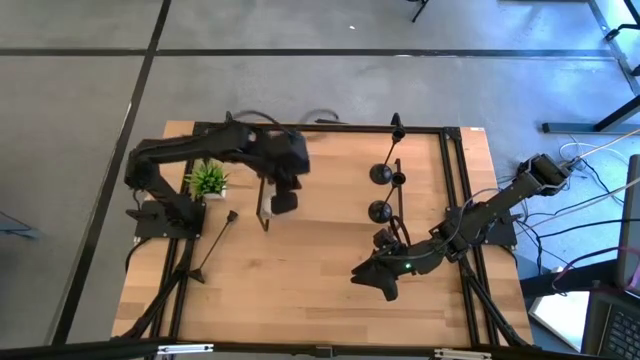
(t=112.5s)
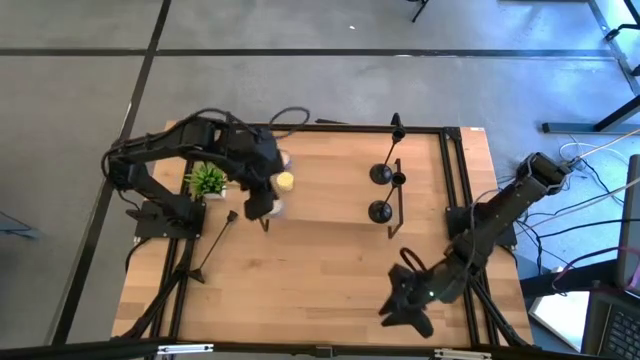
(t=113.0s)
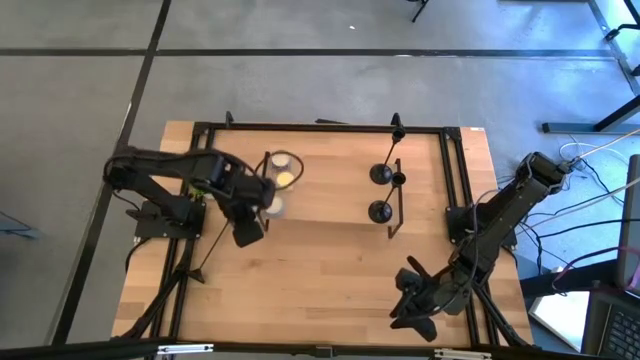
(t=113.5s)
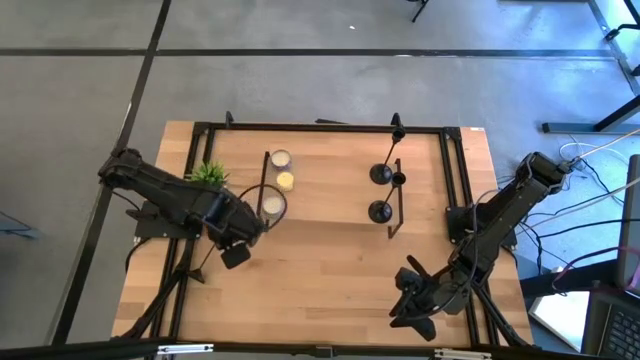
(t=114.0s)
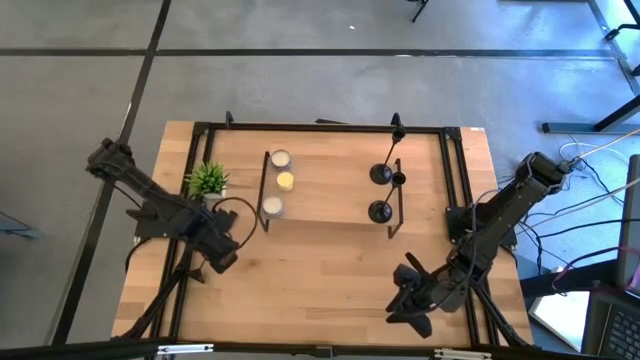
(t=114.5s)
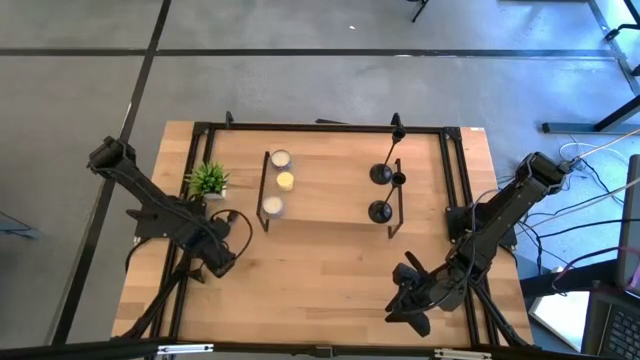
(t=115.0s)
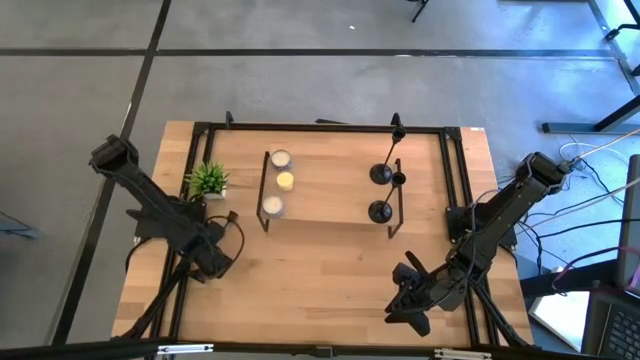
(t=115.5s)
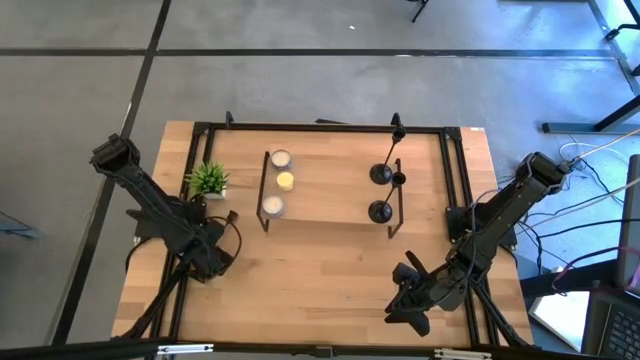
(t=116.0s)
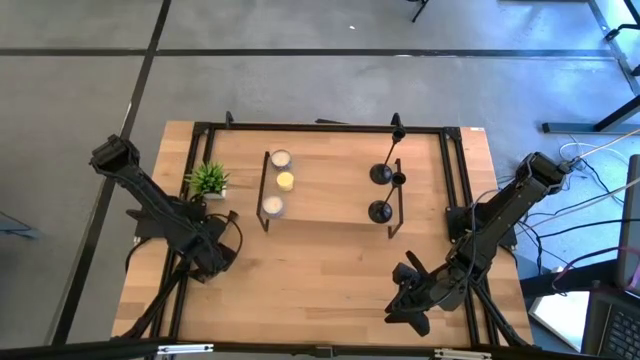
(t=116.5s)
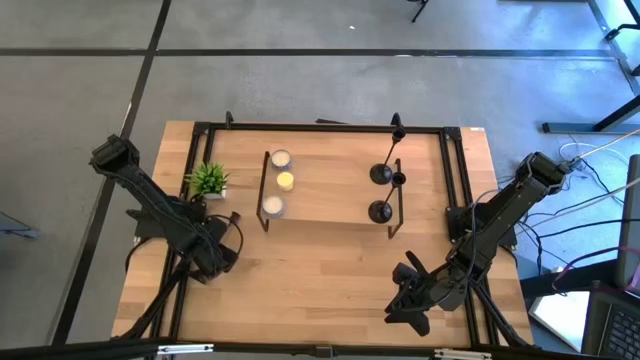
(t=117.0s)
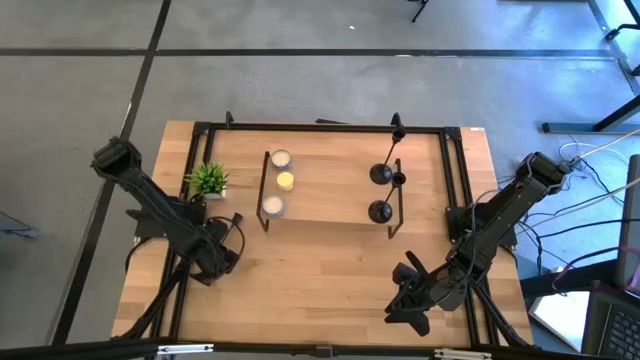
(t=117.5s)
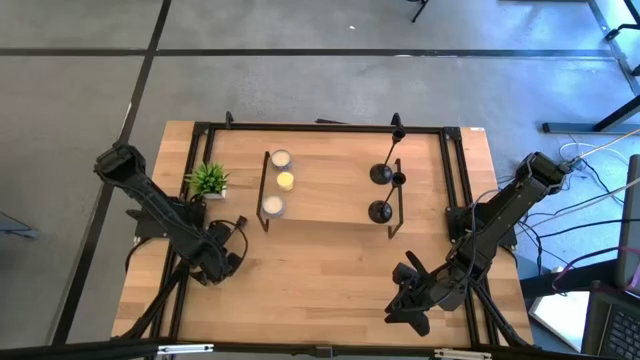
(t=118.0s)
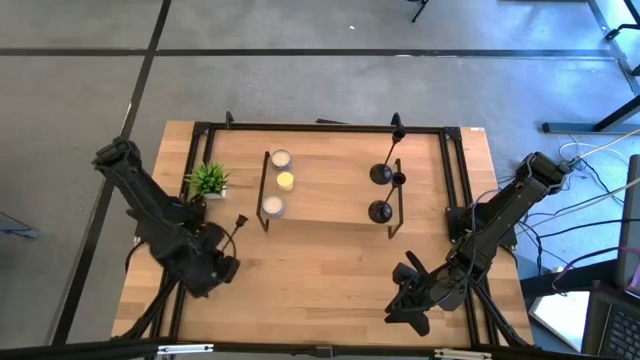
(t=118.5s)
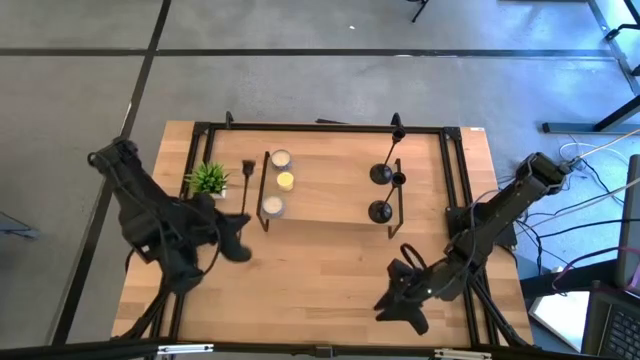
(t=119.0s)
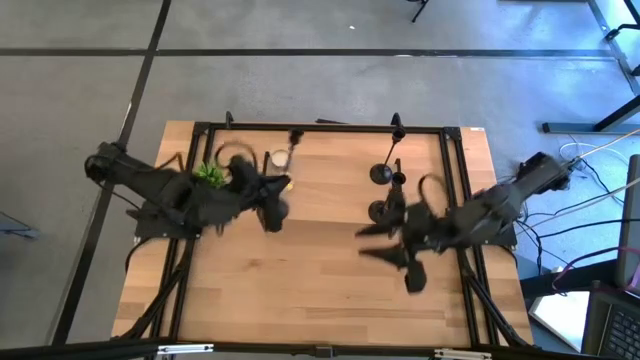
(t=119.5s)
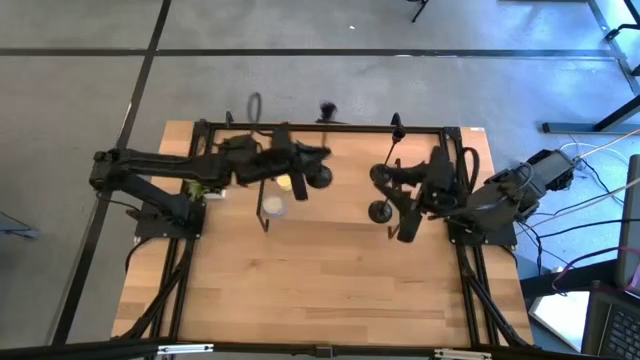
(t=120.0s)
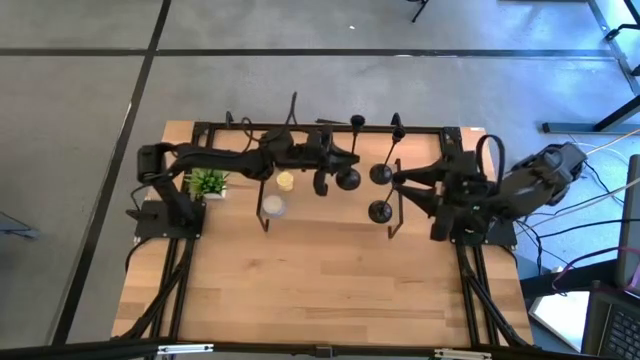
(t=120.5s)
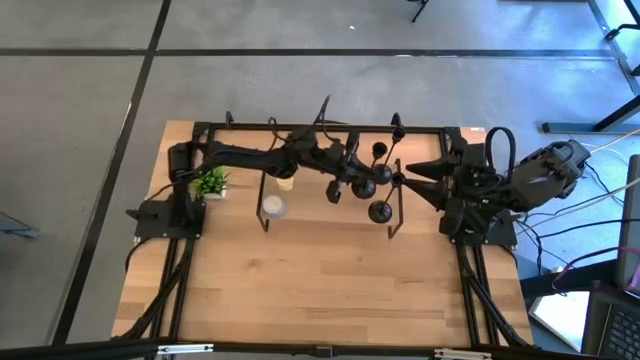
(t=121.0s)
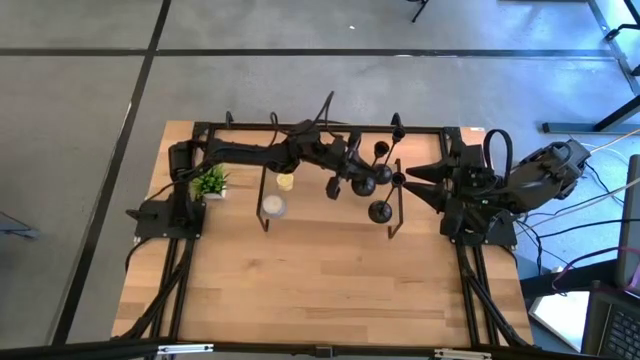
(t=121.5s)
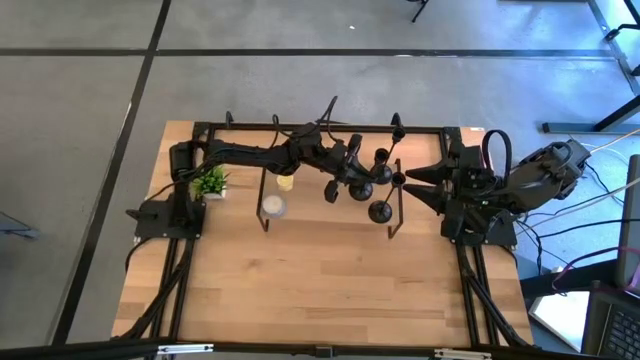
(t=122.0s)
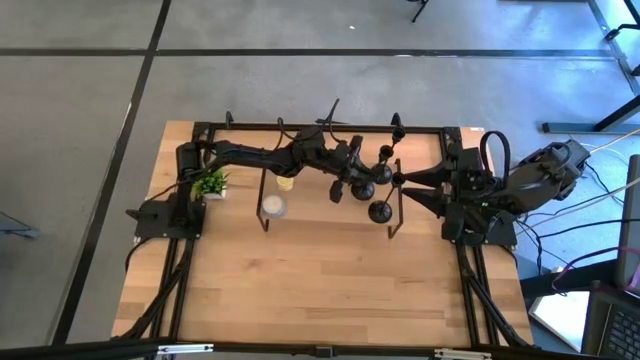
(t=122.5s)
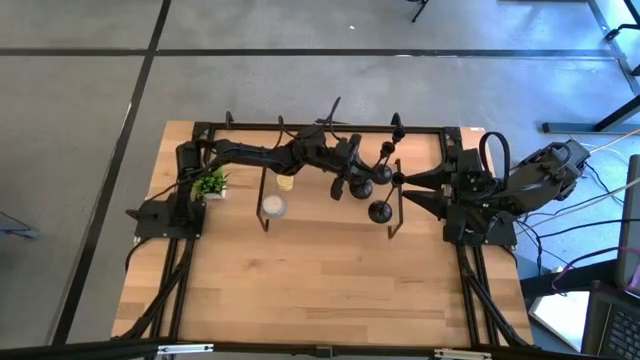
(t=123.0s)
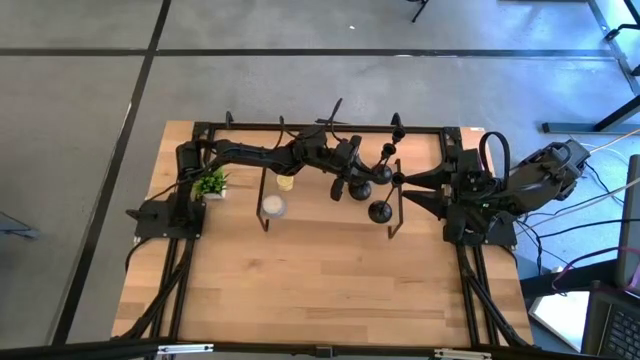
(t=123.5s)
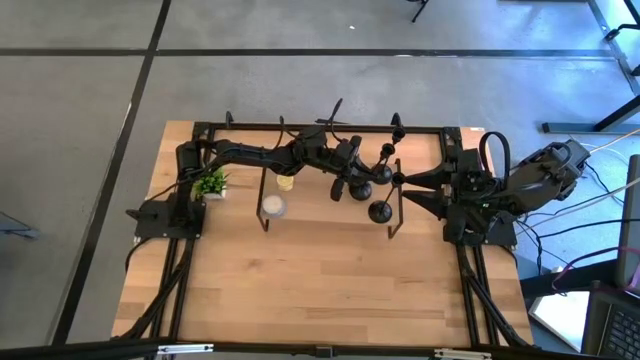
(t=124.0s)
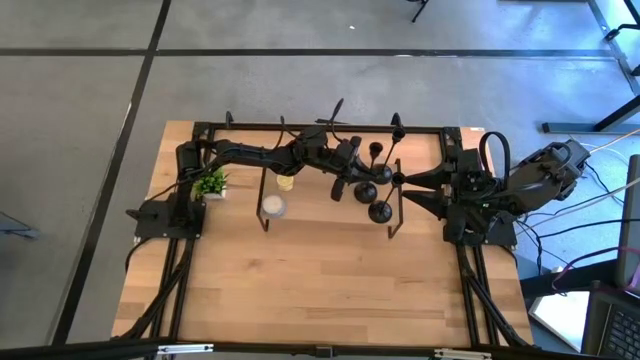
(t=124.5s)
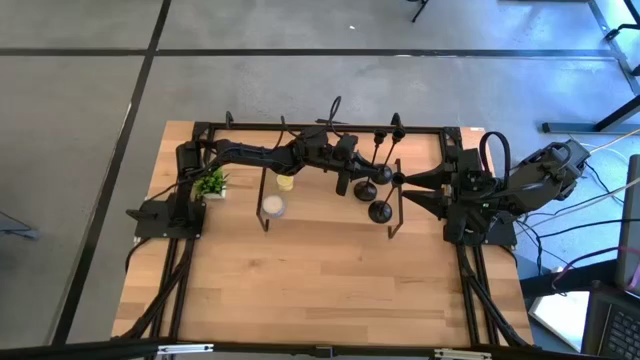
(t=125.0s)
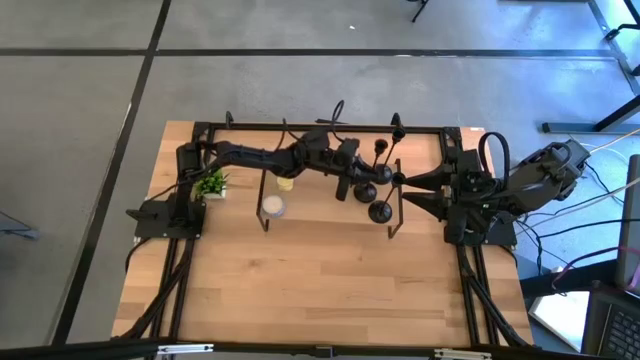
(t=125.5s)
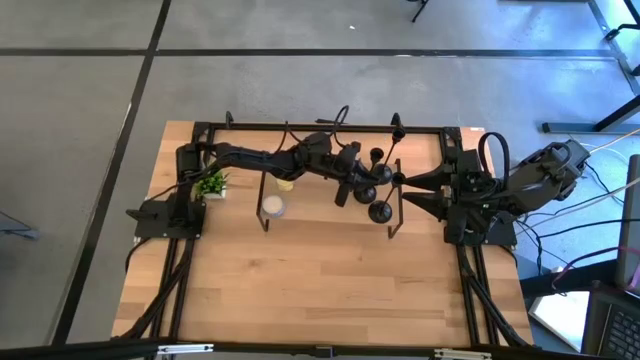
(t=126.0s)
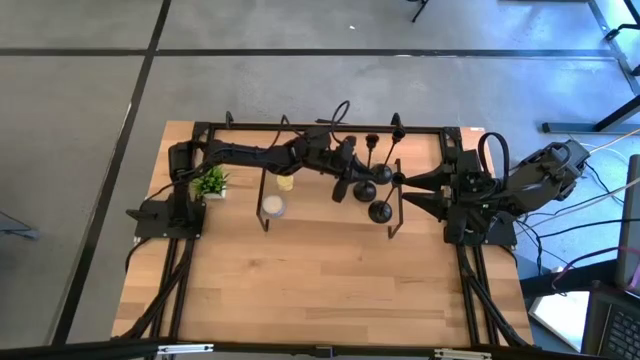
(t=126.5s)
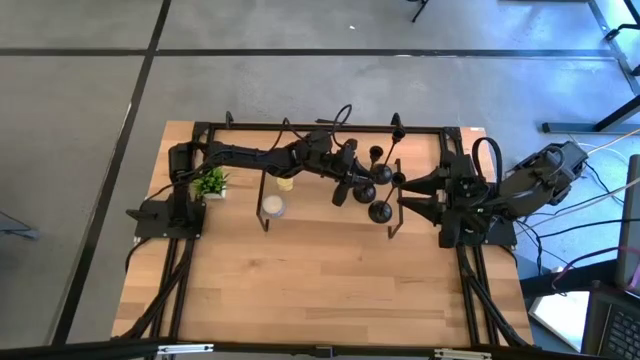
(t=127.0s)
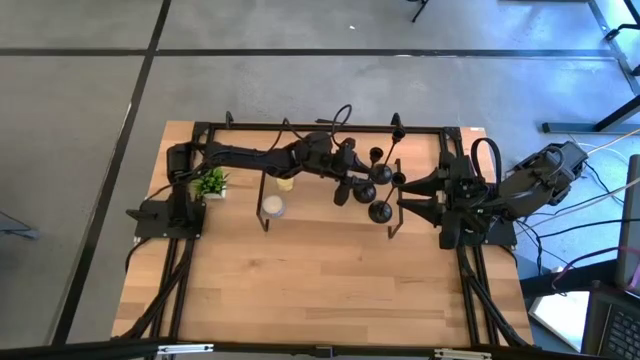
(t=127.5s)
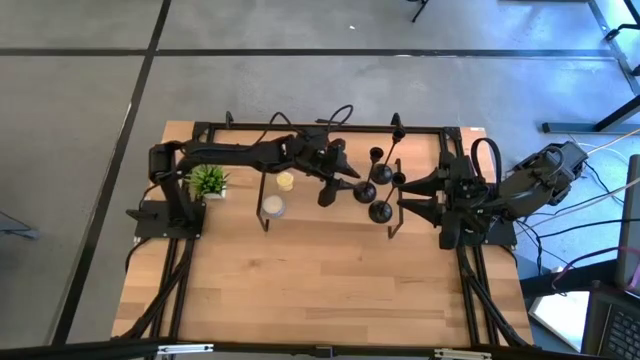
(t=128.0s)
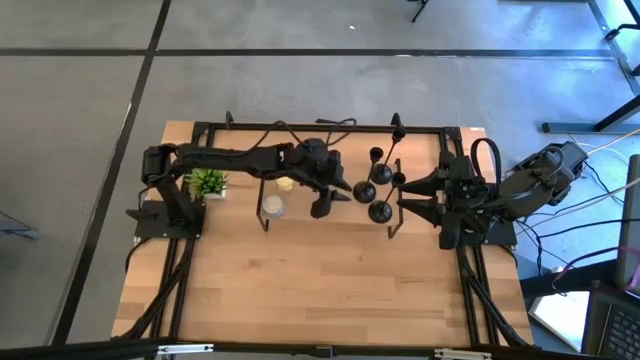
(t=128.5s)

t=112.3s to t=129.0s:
Task: Pick & Place candle stick holders
Put the black candle holder on the shelf

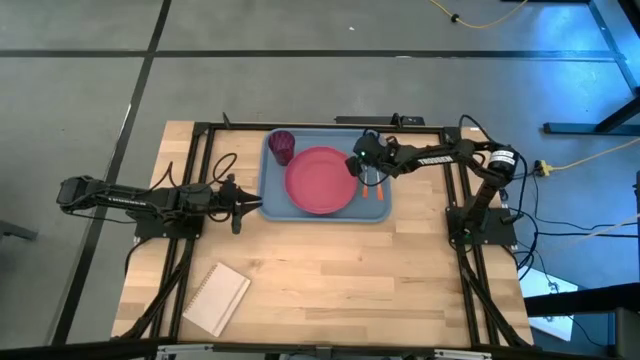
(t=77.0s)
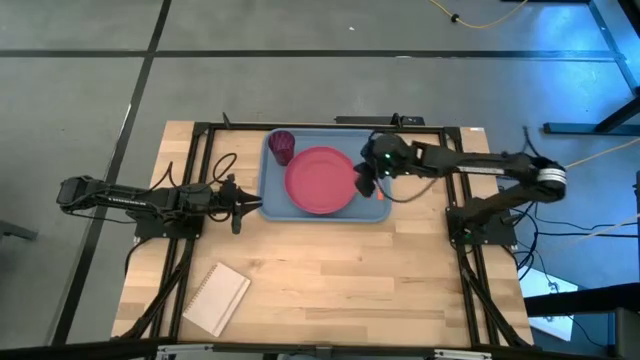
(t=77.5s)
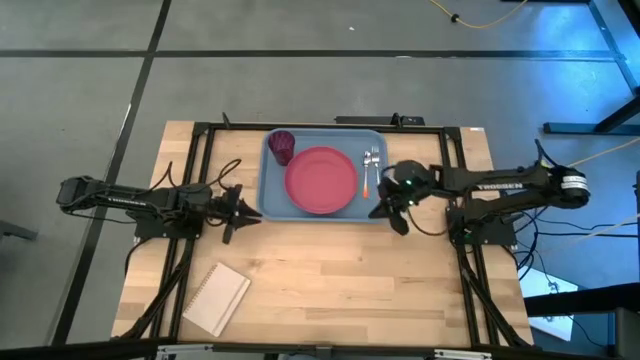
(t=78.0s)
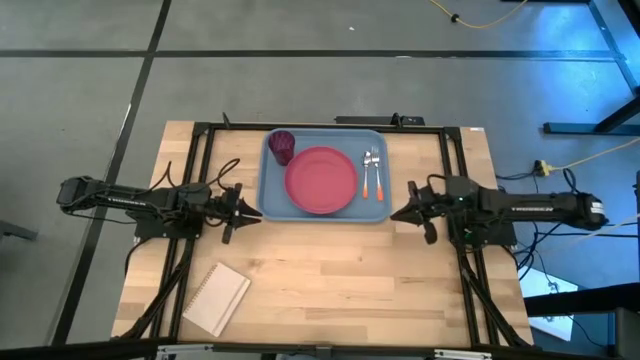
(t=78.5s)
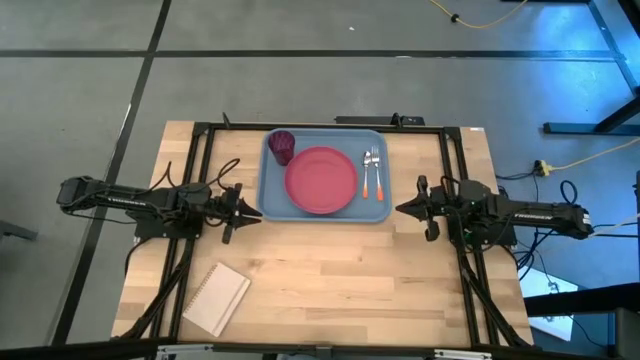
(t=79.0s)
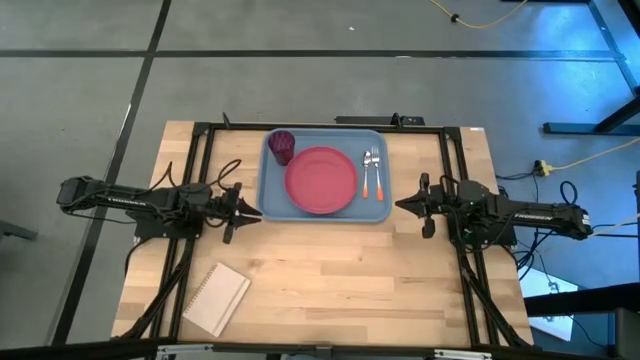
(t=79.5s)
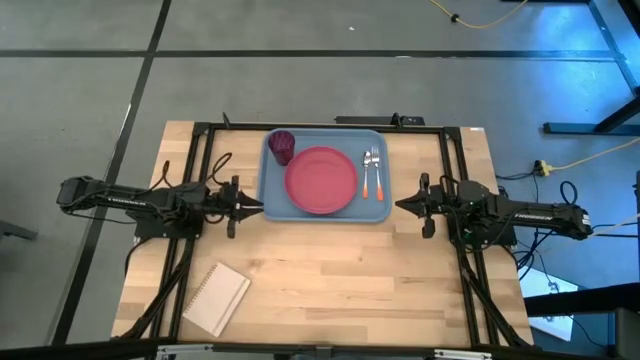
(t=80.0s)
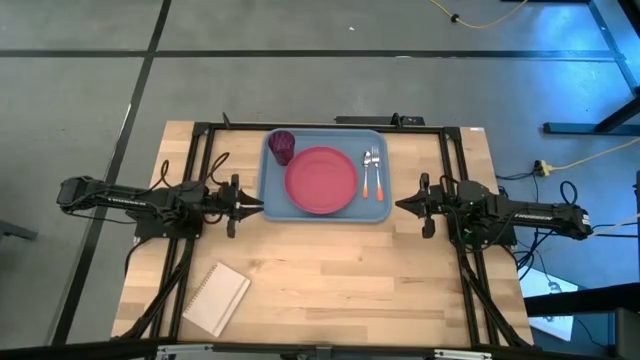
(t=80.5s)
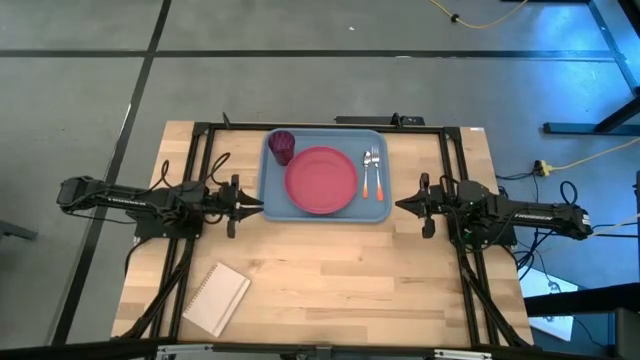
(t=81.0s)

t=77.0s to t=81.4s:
Task: Pick and place plate/cup/fork/spoon on tray
Return to Home Position
